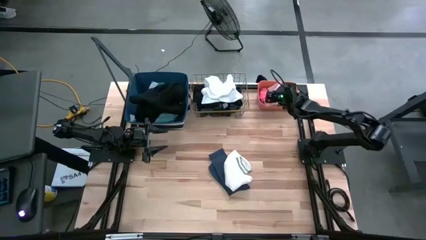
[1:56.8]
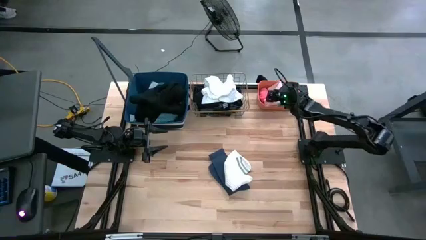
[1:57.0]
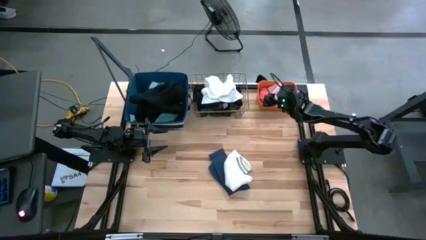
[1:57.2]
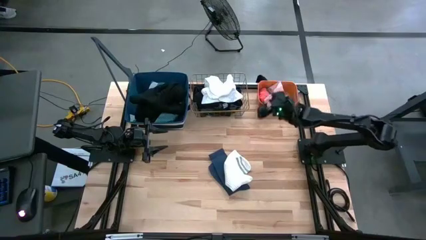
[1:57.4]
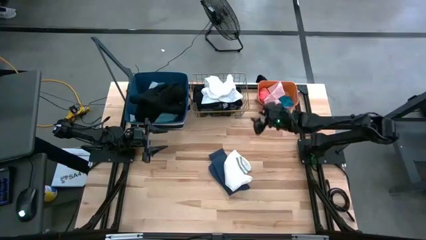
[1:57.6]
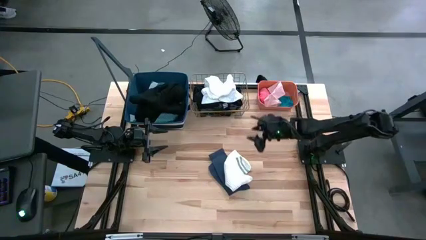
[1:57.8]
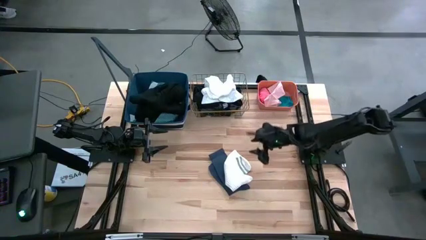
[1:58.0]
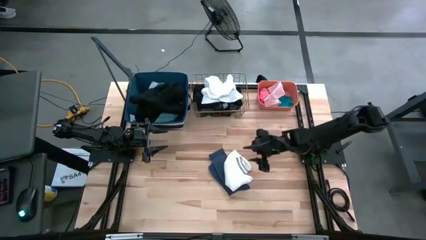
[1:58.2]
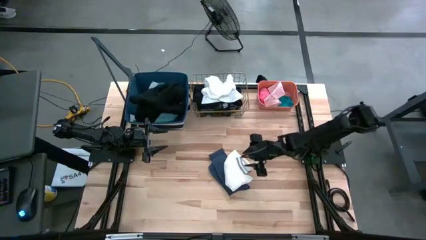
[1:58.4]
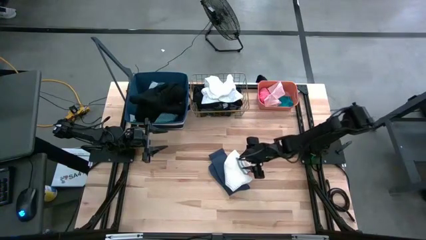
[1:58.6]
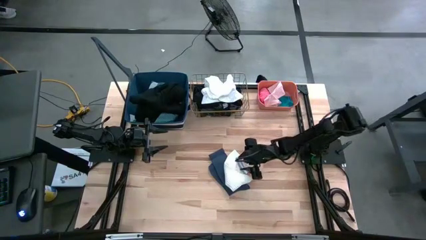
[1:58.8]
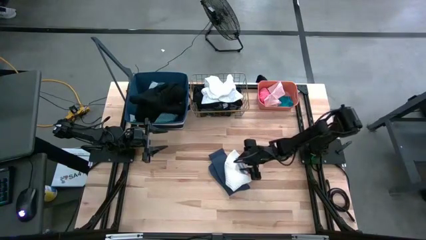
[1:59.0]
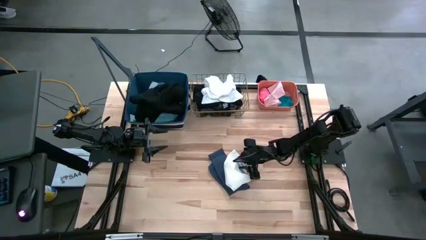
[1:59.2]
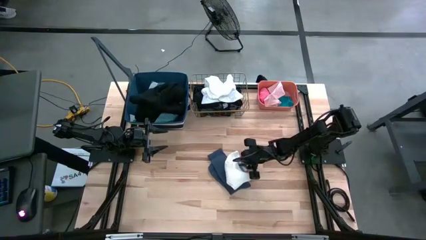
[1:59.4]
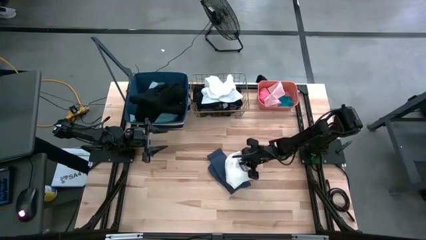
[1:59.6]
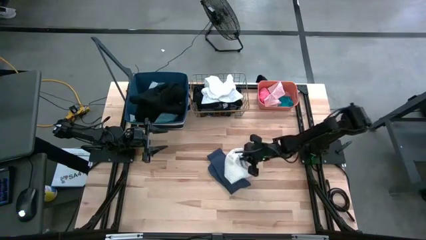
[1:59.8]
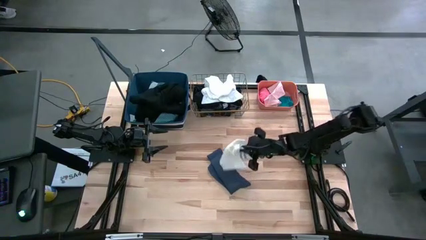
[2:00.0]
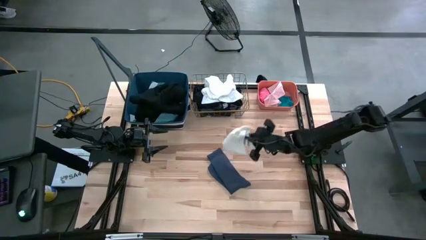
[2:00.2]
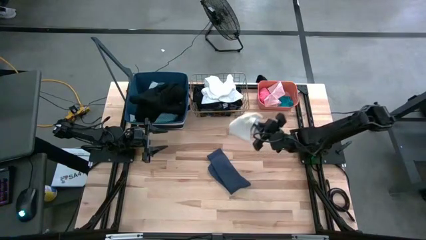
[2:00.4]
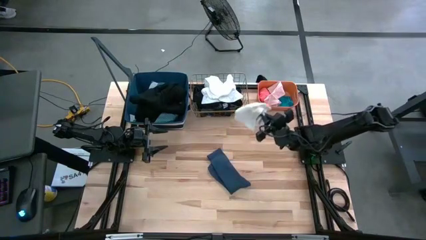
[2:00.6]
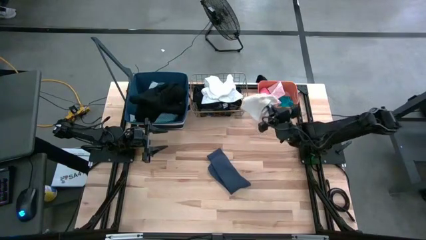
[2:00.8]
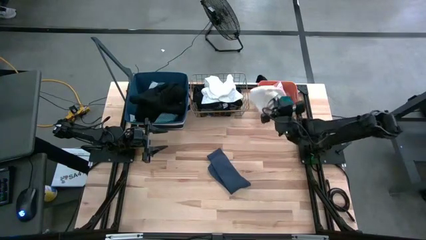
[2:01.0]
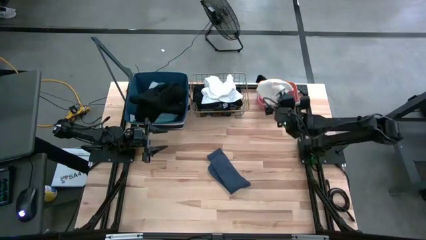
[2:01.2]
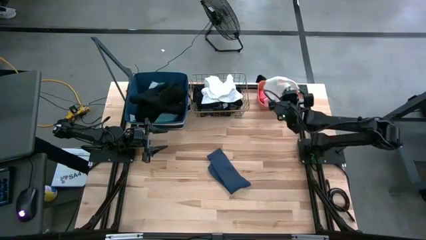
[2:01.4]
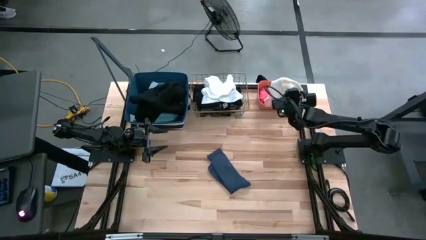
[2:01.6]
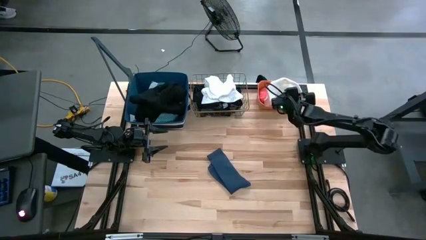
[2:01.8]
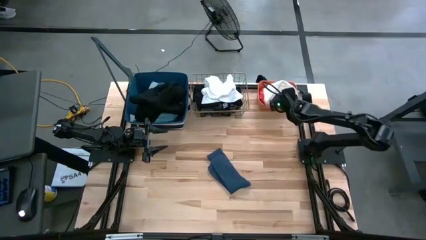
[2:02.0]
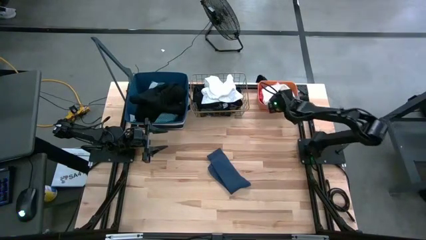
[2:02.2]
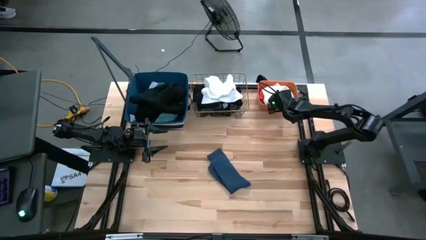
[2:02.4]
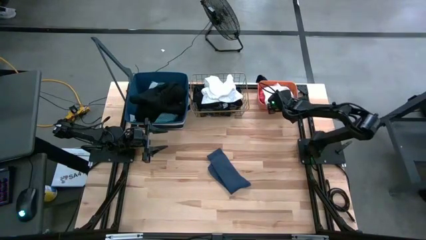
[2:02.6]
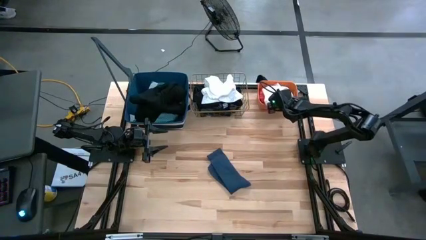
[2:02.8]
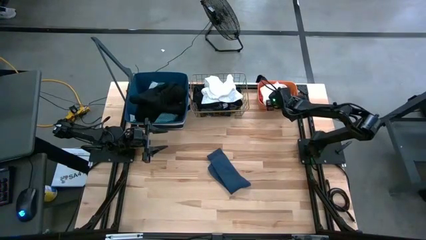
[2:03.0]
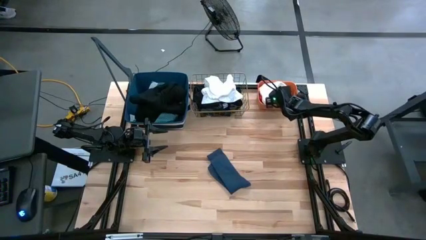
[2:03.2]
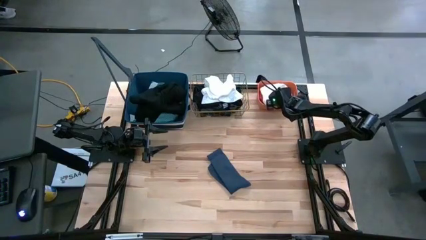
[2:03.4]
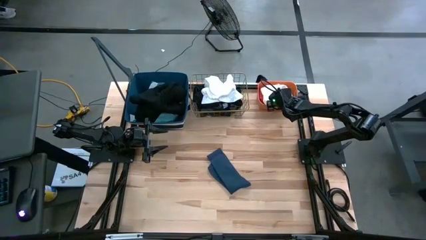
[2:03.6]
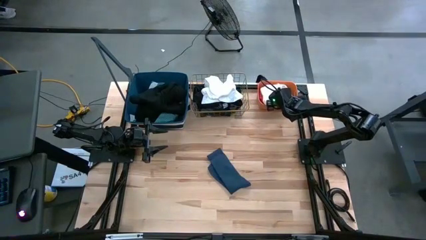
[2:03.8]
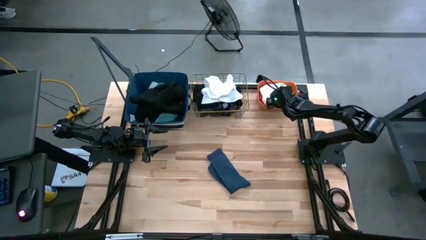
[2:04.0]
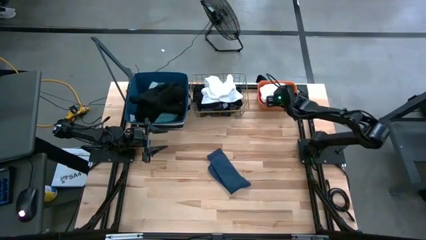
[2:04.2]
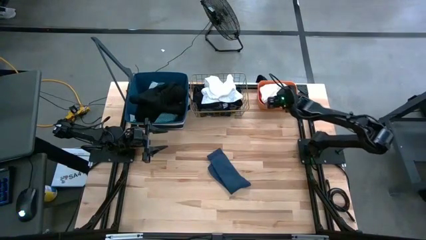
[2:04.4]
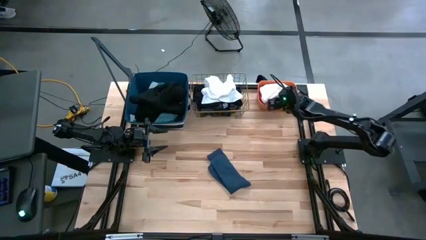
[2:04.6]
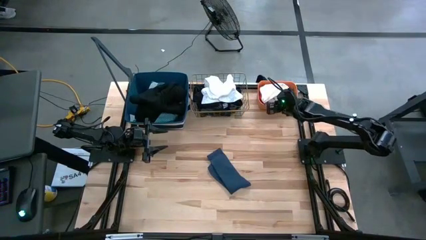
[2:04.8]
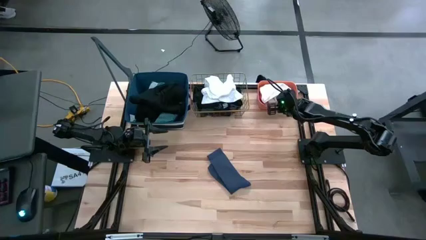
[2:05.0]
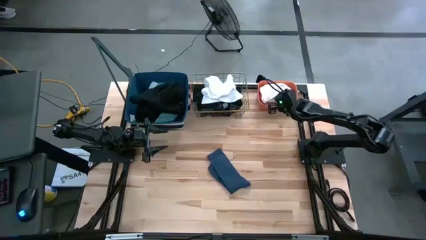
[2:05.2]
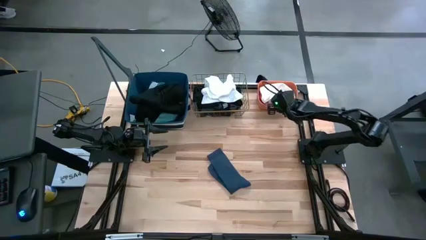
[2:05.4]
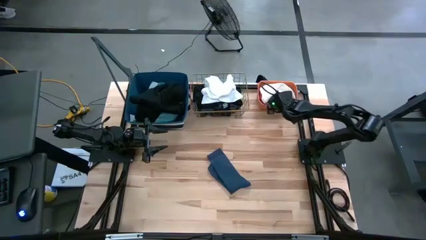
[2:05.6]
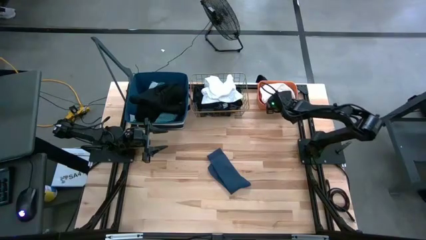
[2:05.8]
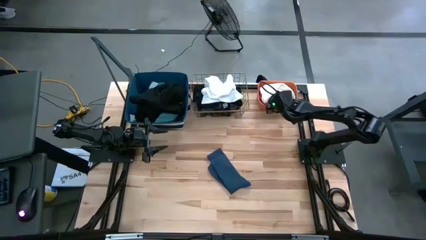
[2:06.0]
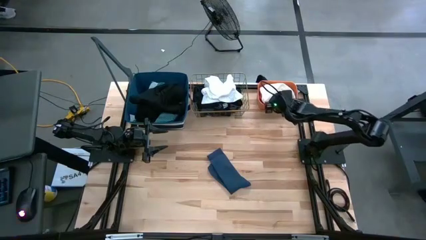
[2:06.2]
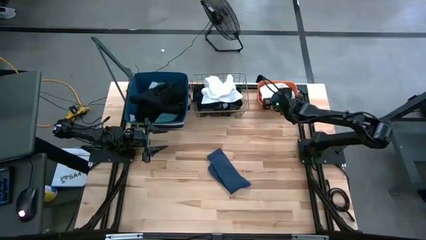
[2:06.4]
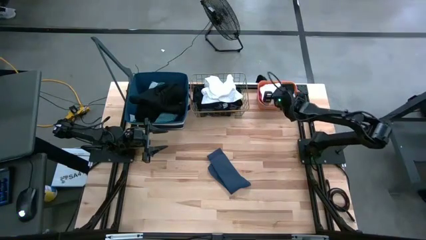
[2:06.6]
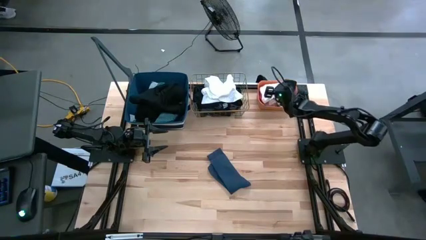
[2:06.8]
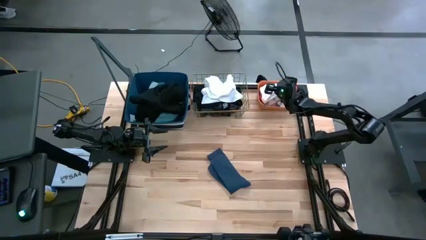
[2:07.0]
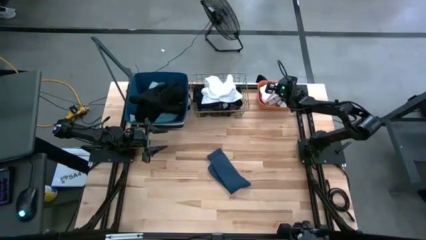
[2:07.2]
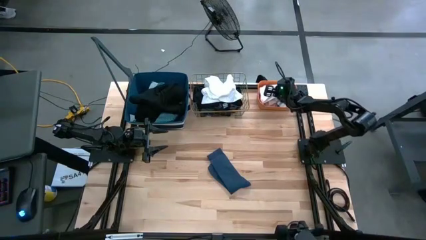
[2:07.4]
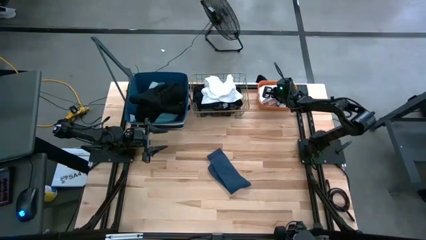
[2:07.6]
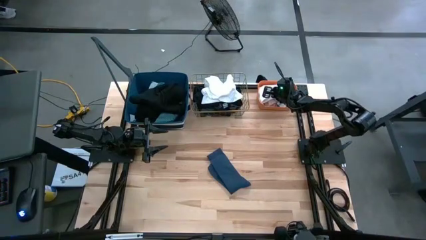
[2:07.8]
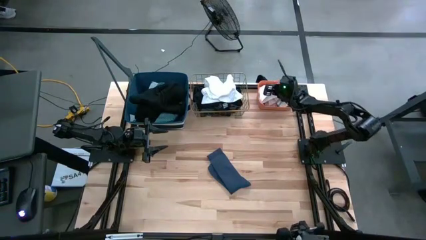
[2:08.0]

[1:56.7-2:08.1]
Task: Pick & Place Cloths
Put the white sock into the orange bin

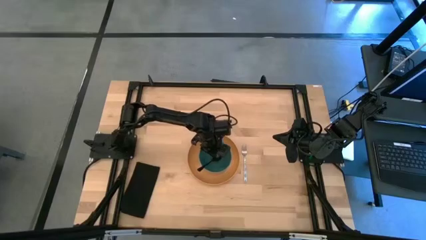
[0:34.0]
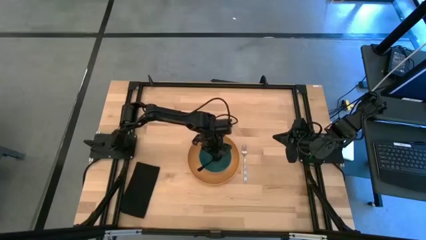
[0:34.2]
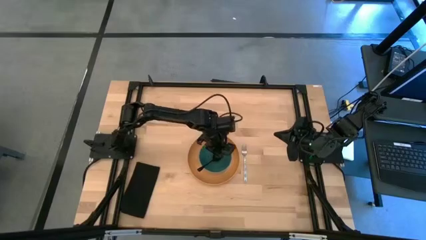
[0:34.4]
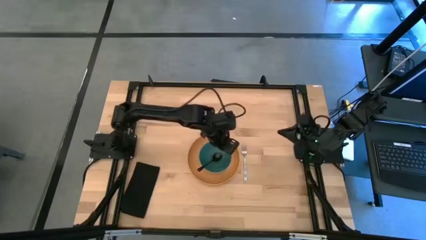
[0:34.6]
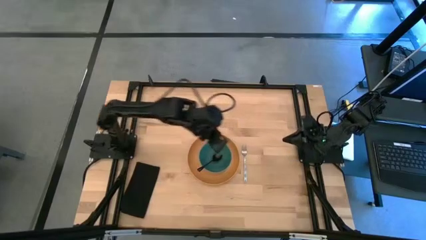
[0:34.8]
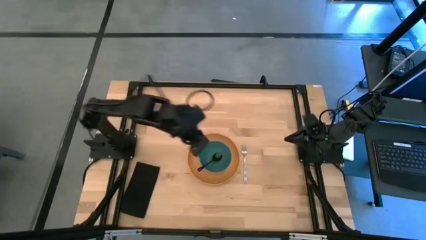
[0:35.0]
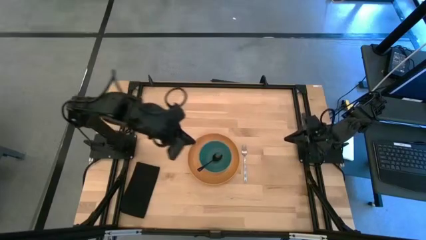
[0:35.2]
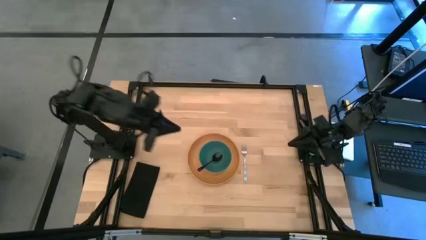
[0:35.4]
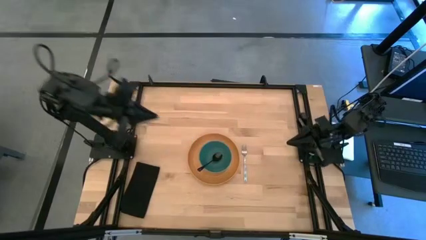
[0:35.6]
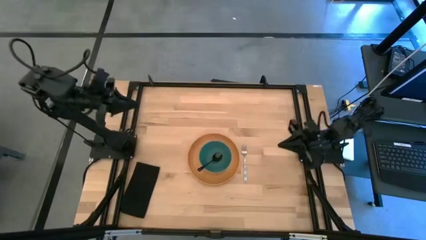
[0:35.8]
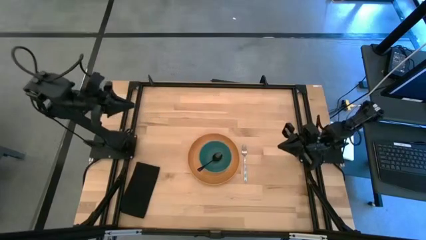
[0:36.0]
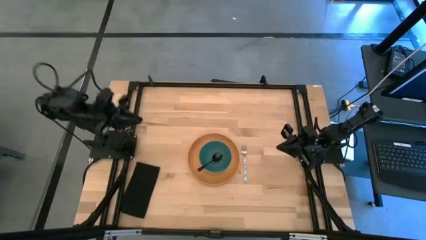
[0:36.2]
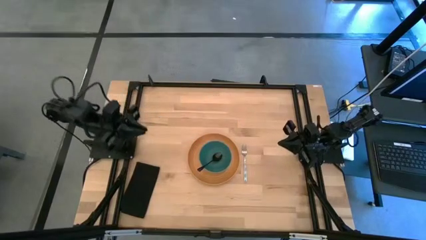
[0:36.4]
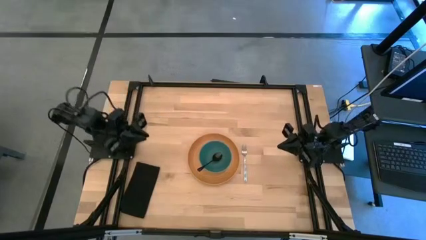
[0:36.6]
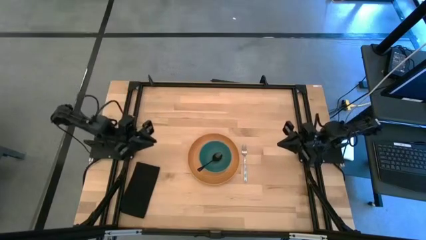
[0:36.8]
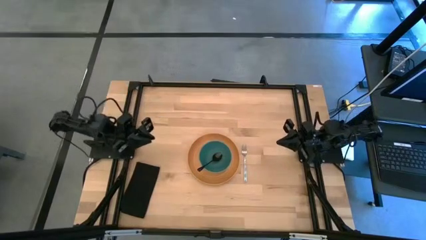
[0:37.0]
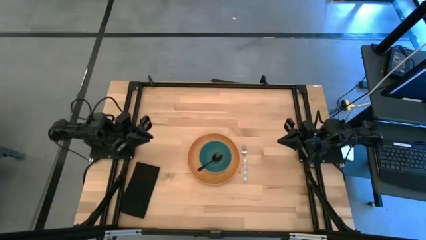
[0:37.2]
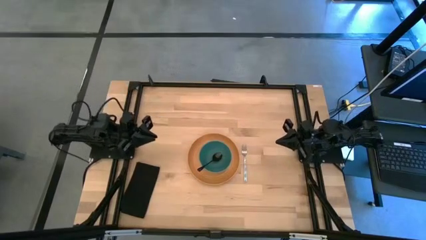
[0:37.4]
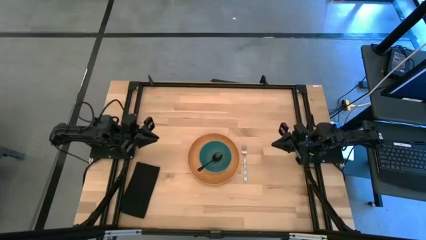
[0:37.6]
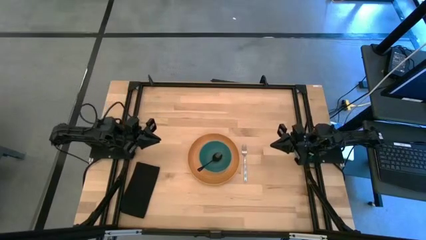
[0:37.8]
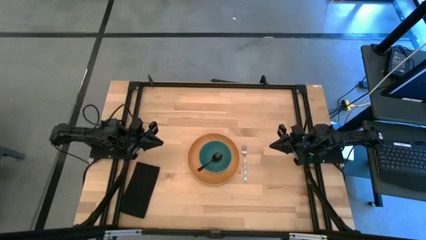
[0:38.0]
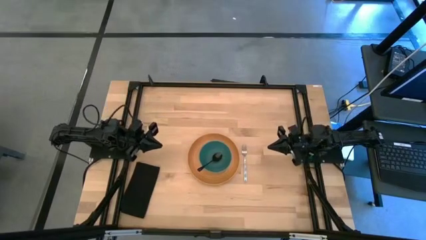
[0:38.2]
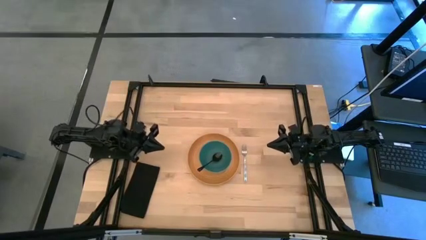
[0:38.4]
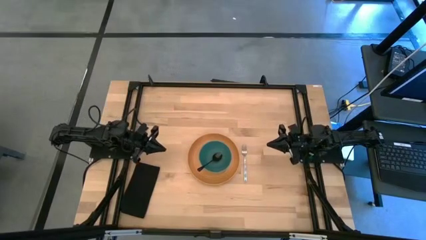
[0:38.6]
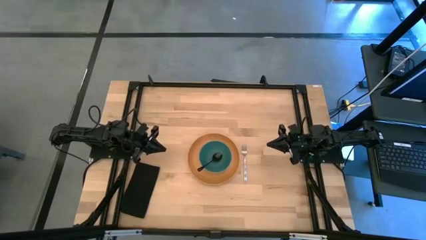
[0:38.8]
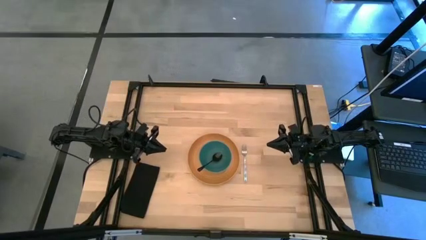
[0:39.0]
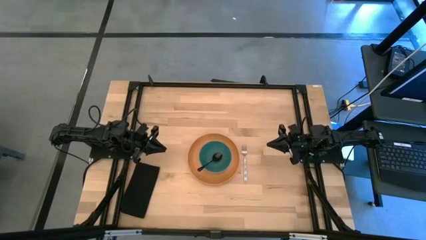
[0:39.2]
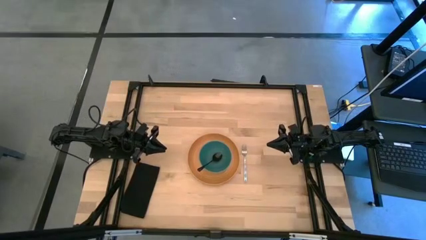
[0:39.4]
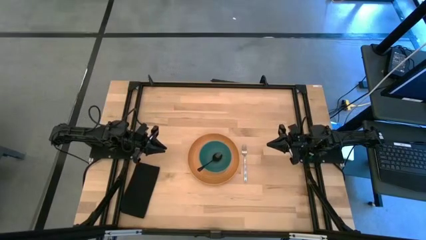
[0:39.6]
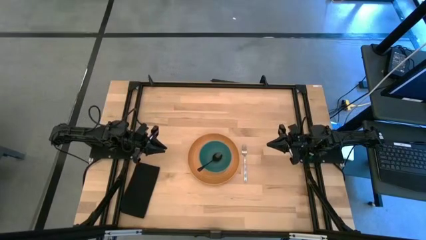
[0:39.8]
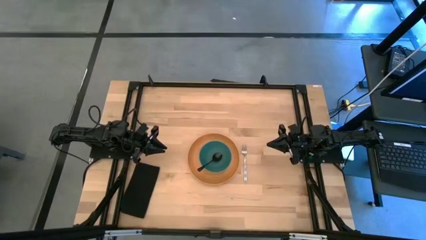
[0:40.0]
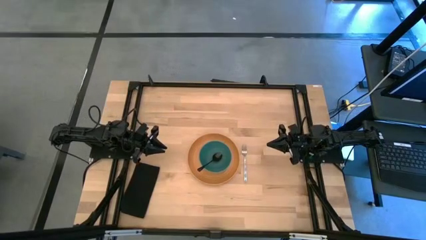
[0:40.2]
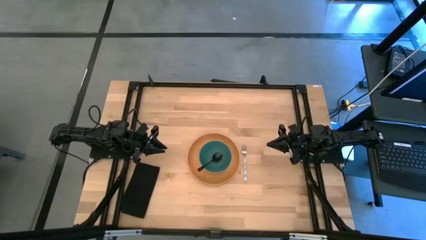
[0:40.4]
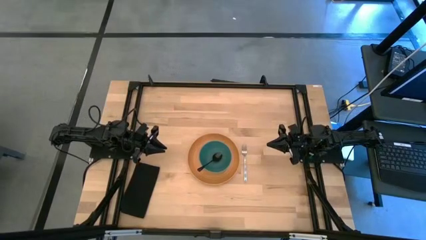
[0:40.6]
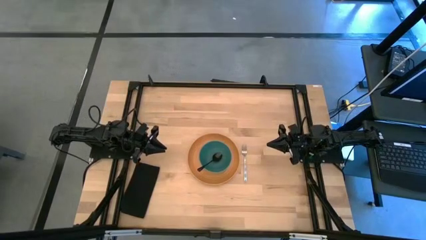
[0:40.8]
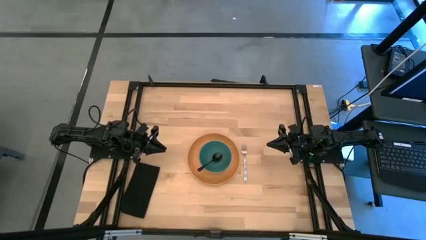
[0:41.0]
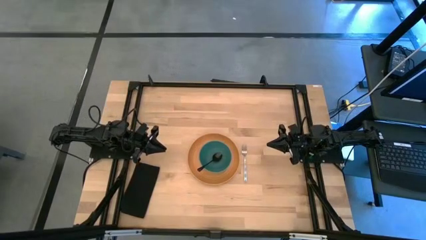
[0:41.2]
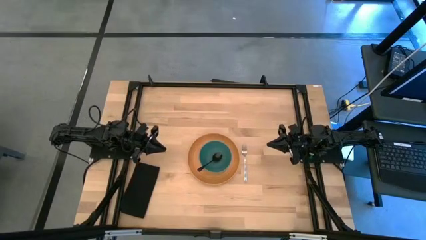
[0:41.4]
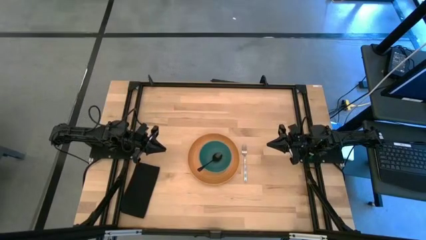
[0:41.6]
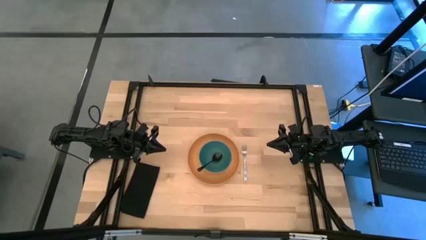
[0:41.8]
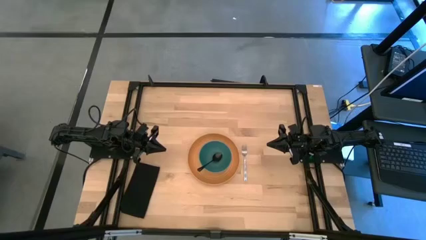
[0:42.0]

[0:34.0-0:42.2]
Task: Set table place
Return to Home Position
